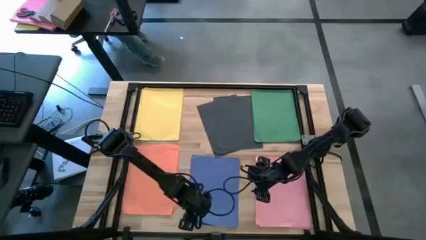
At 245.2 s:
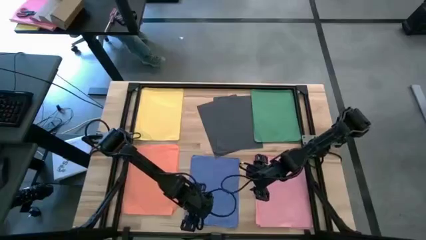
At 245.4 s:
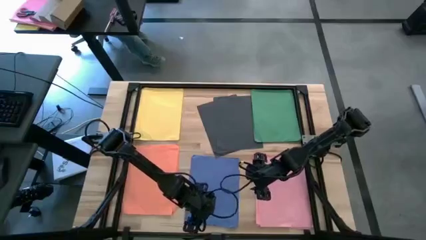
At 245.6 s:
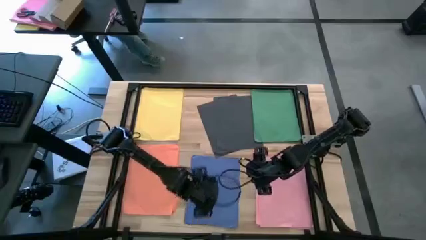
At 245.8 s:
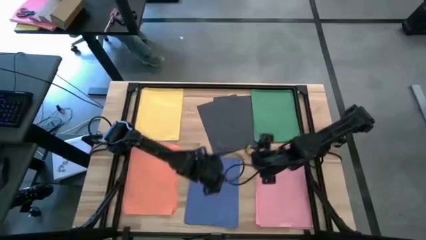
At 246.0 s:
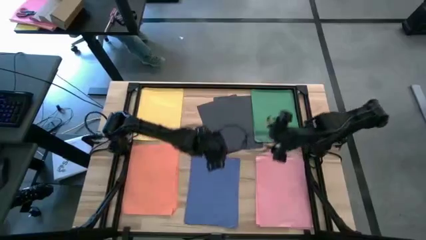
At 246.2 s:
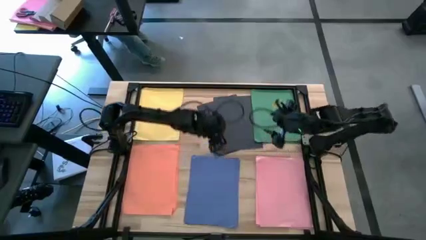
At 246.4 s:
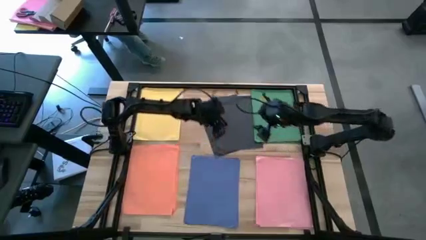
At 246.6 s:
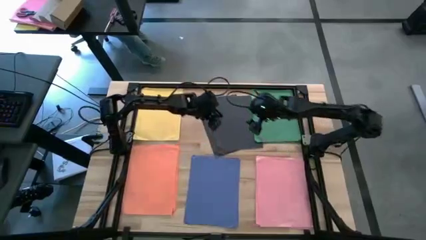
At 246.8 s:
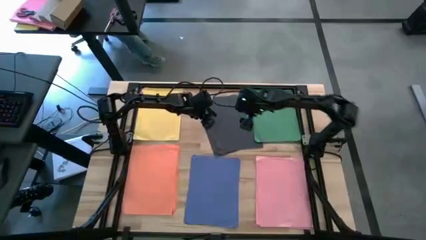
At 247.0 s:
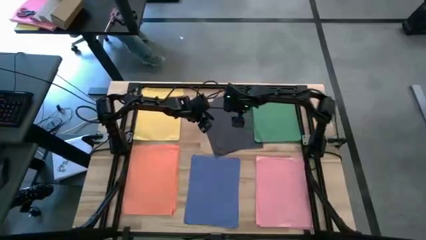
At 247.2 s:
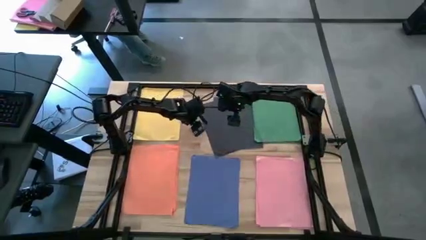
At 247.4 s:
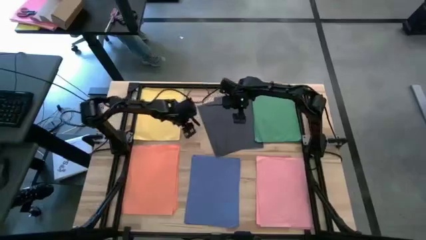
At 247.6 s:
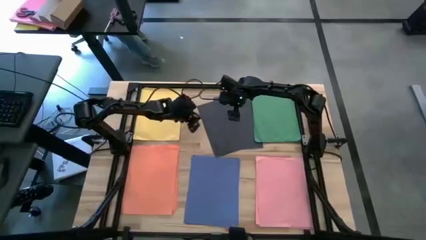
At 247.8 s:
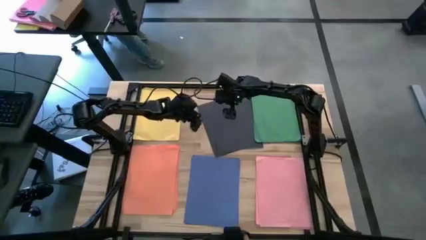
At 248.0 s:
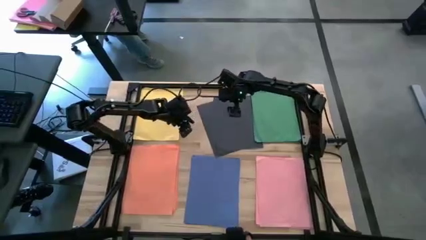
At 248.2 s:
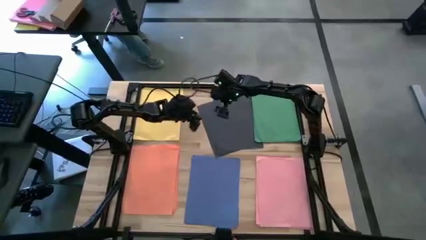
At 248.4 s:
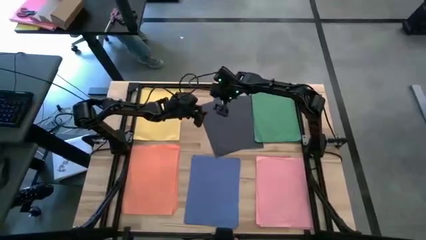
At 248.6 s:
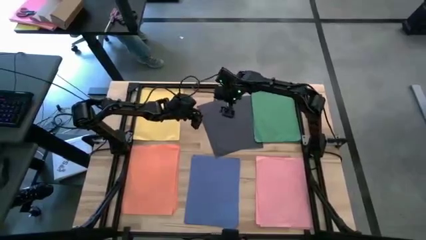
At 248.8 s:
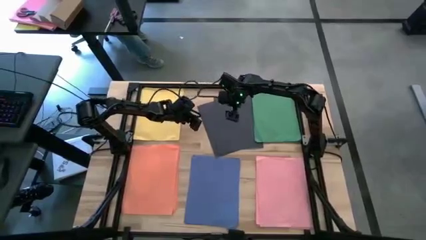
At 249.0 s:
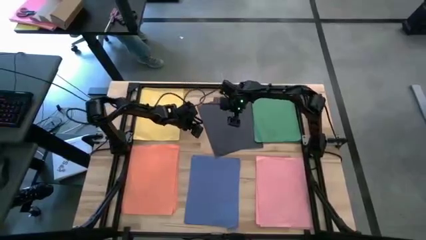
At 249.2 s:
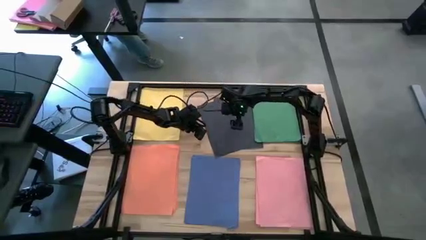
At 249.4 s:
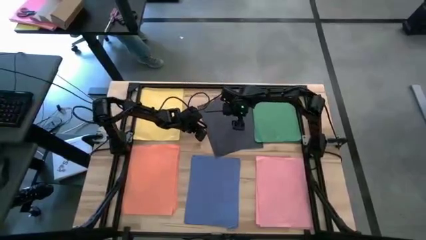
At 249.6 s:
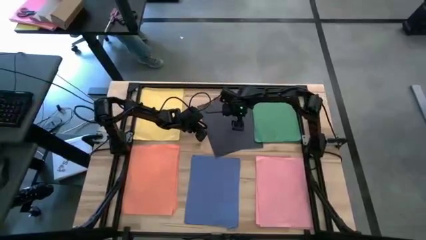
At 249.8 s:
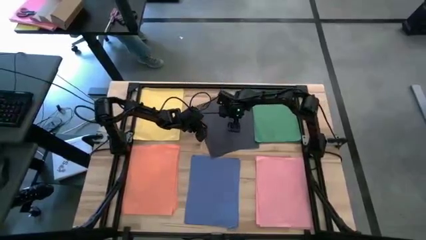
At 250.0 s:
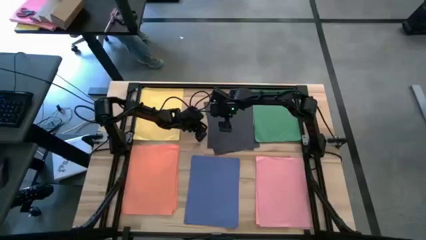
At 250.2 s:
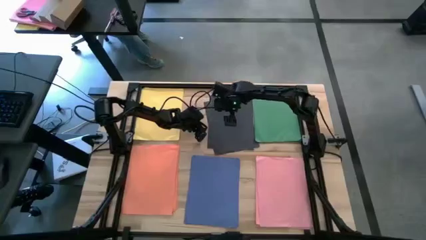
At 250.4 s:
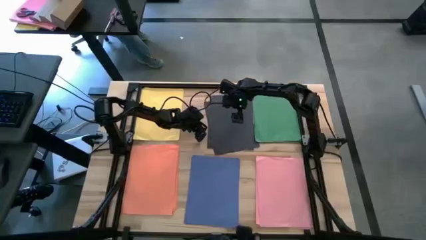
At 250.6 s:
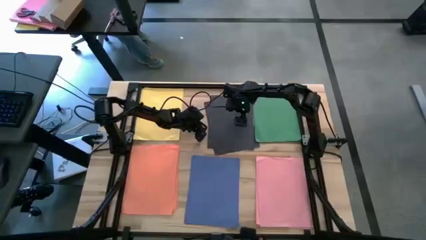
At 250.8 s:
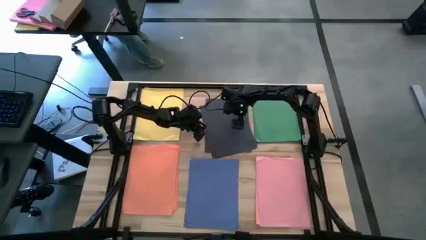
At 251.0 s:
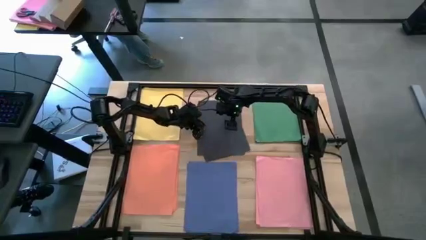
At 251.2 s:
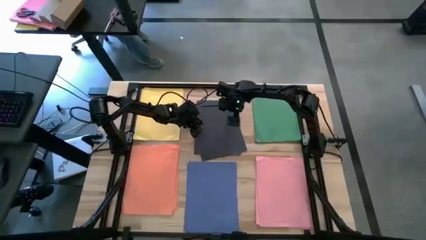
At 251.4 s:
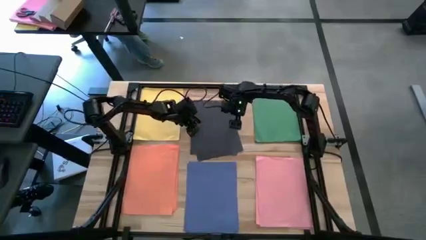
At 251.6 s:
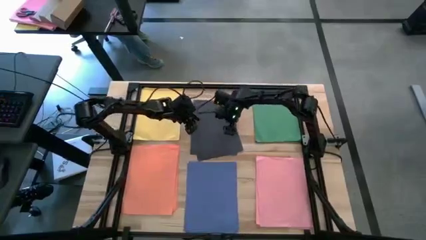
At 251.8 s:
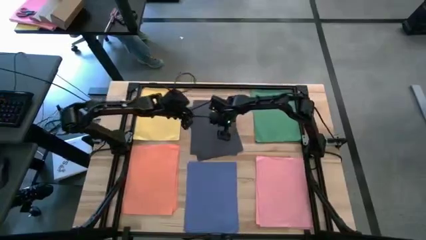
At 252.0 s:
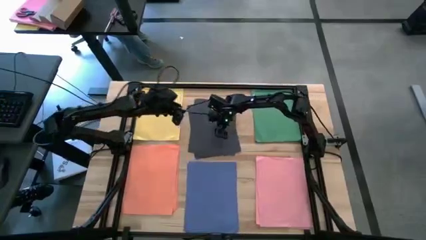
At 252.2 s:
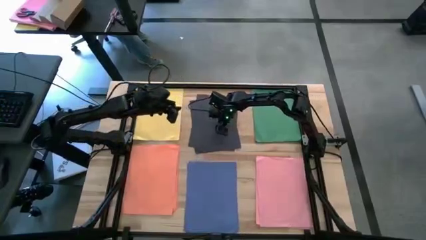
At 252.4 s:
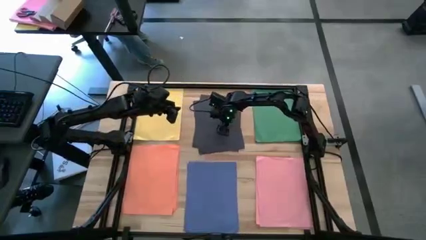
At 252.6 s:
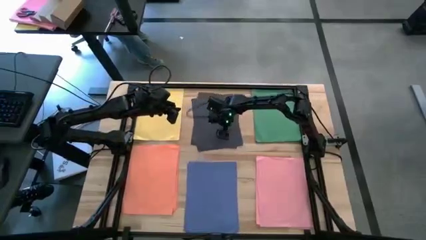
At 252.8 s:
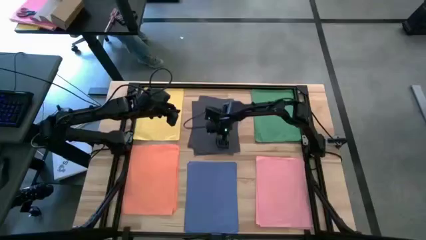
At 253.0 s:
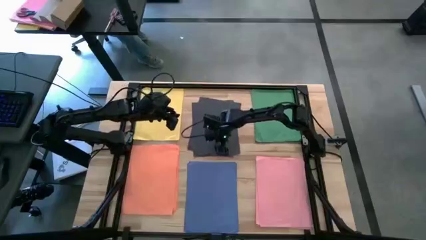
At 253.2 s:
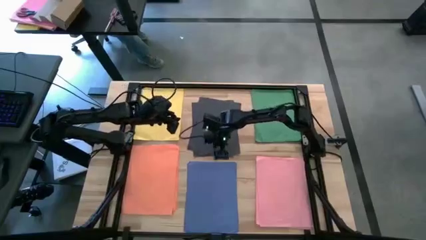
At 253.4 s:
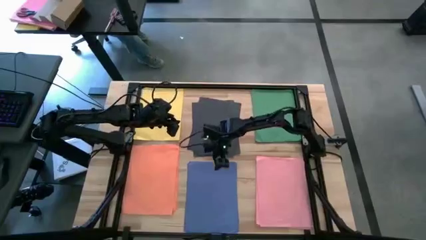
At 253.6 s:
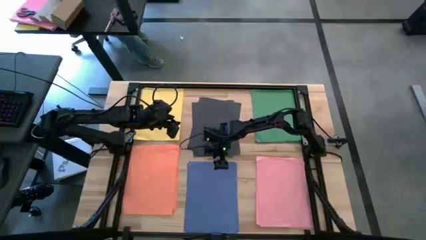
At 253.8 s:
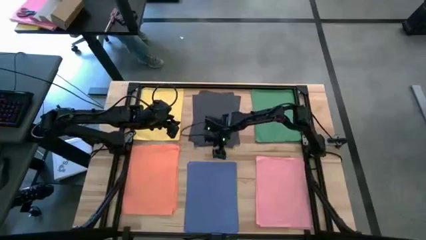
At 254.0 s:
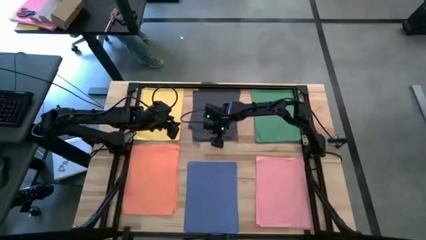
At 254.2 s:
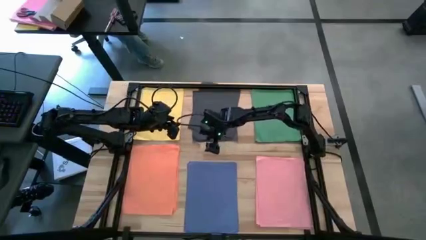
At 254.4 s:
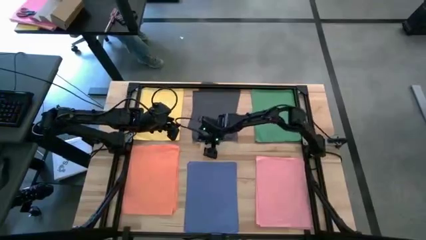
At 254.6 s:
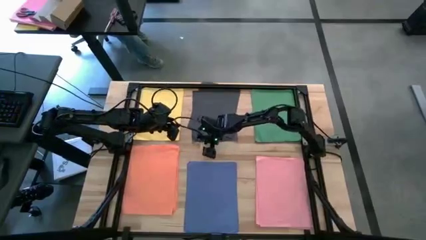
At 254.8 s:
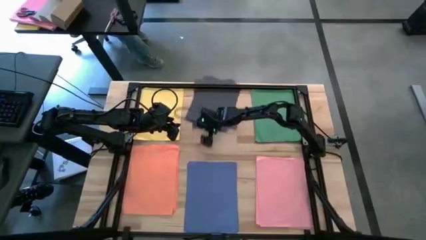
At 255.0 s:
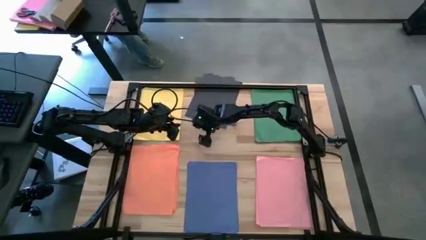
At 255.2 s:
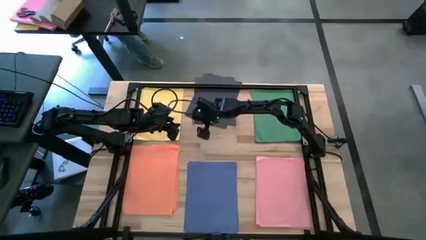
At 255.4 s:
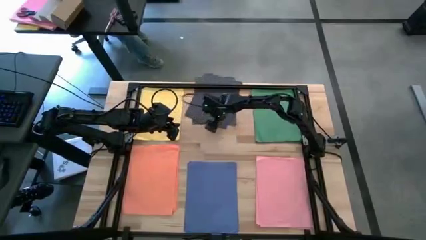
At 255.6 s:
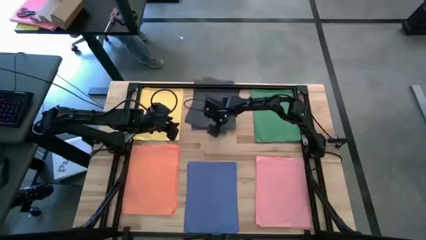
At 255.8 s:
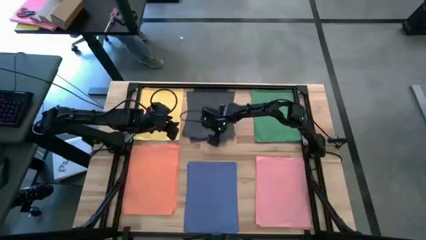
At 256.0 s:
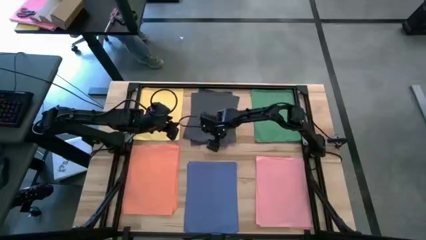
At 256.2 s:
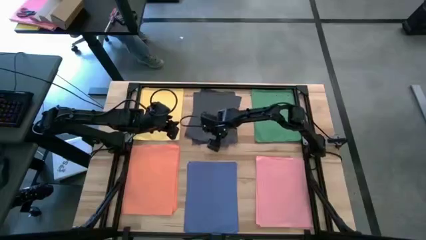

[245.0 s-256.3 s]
Task: Organize paper
Adjust the stacked black papers

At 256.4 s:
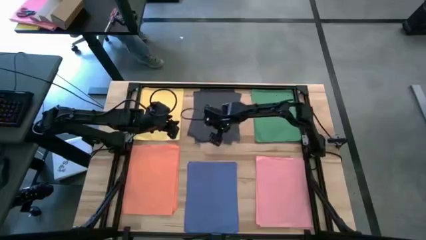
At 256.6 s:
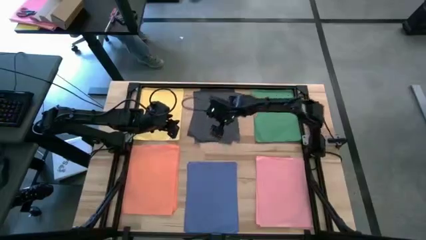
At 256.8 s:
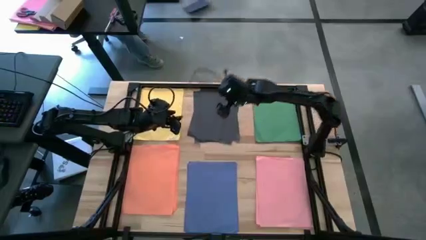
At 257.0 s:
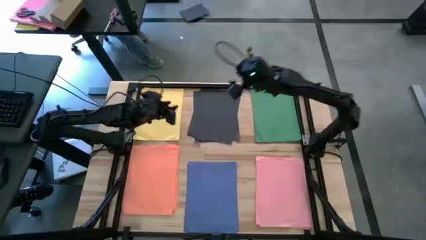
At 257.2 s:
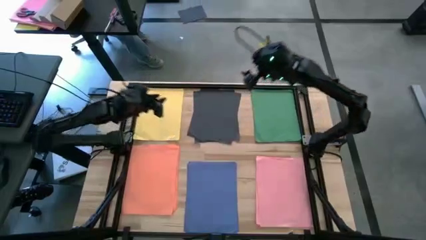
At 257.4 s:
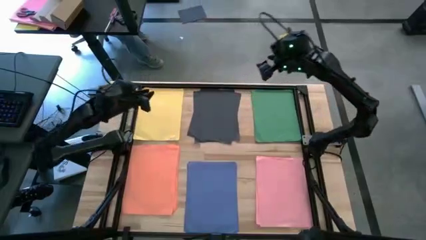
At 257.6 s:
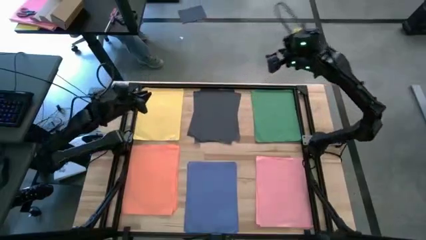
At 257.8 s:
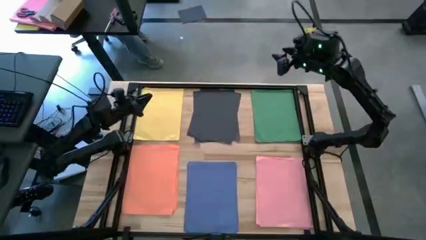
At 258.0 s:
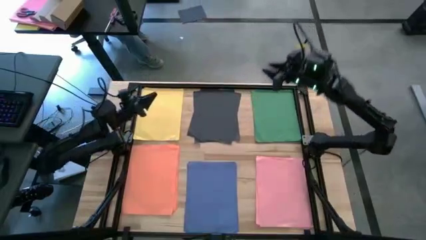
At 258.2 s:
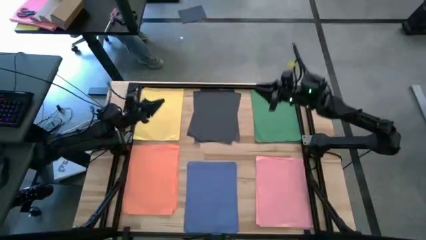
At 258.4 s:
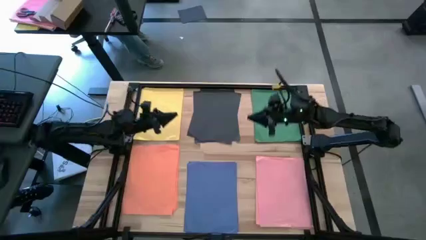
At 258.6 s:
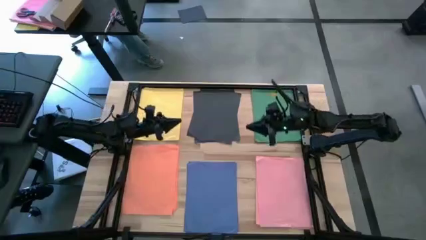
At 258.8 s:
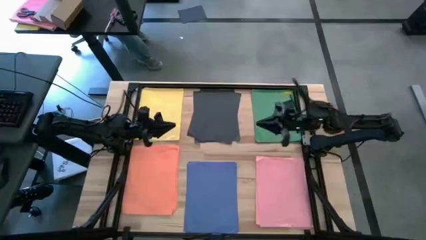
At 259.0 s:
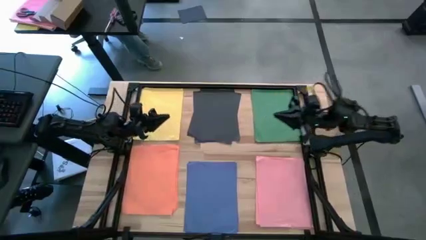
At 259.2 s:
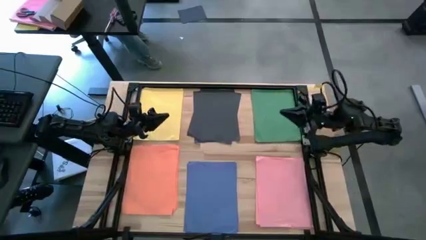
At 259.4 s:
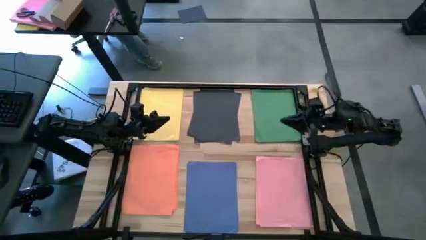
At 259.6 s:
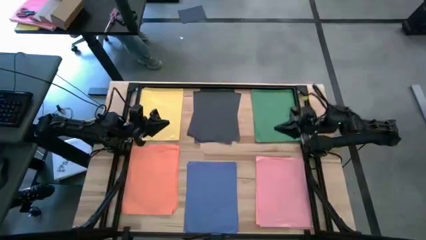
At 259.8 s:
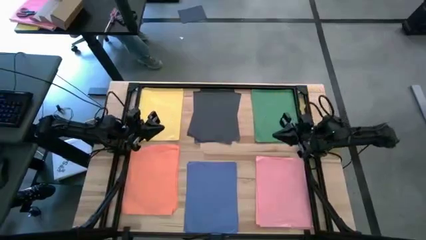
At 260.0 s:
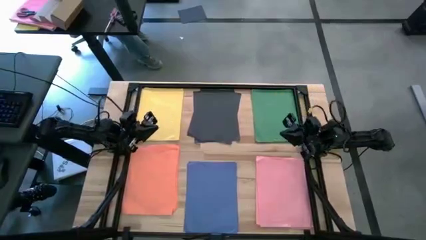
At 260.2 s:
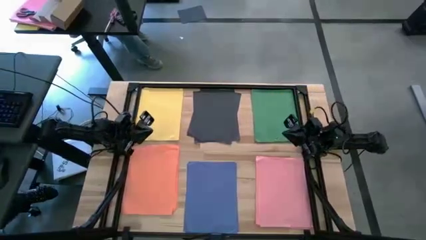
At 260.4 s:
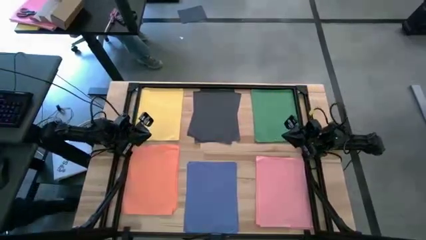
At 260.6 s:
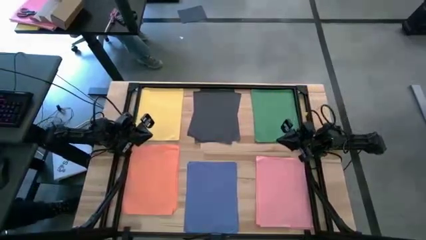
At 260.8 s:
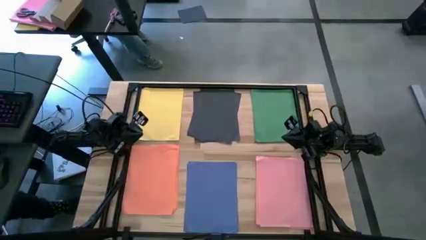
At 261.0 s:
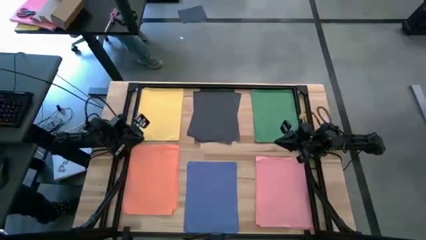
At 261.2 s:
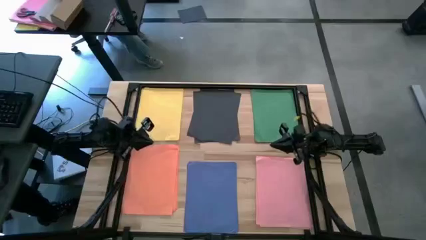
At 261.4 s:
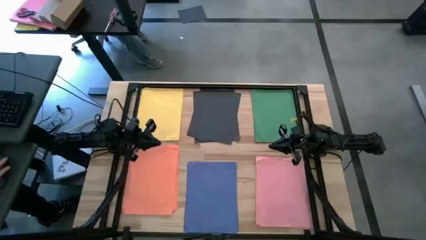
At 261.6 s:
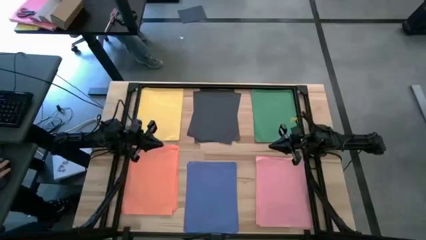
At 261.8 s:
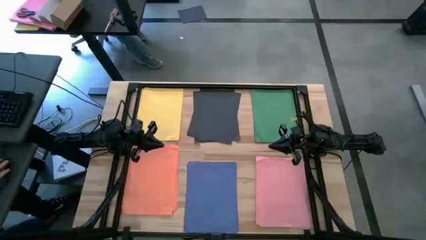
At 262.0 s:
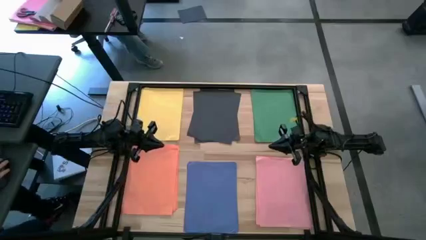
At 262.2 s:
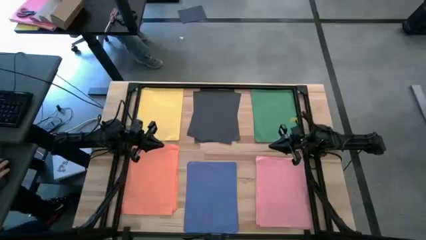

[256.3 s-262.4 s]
Return to Home Position
